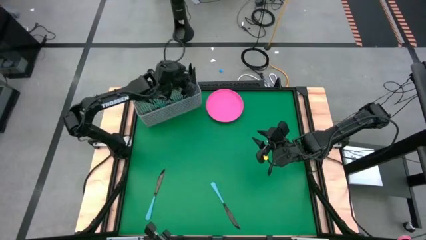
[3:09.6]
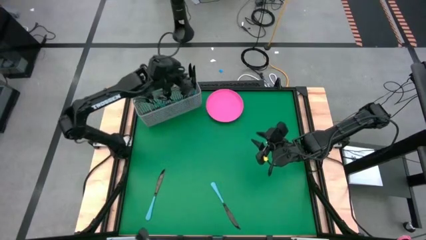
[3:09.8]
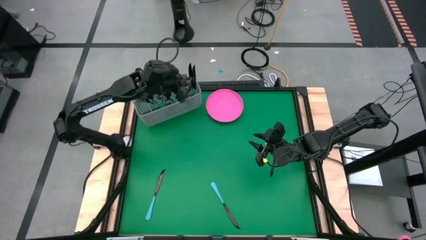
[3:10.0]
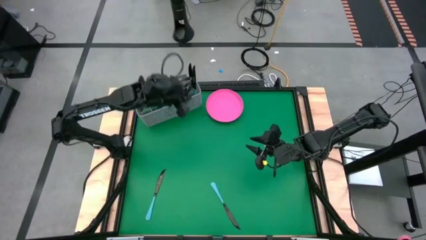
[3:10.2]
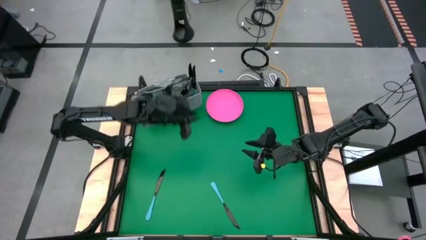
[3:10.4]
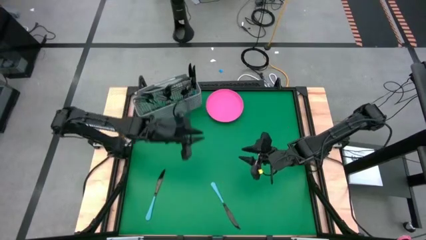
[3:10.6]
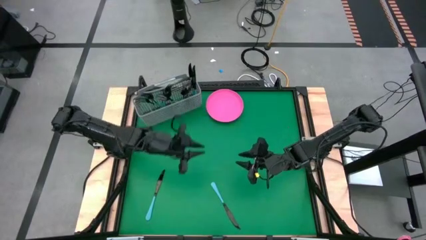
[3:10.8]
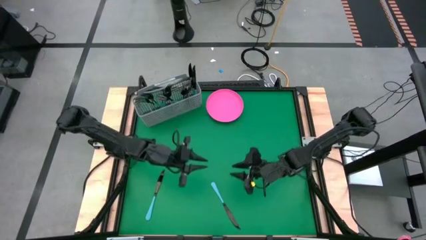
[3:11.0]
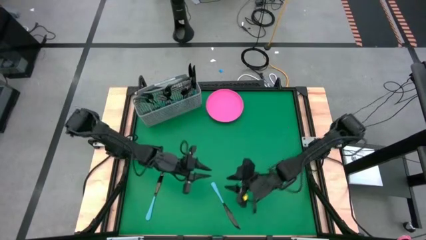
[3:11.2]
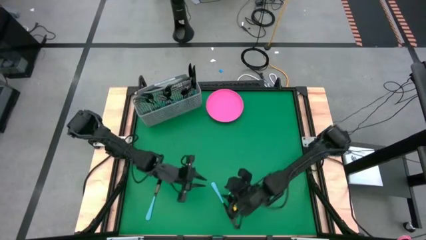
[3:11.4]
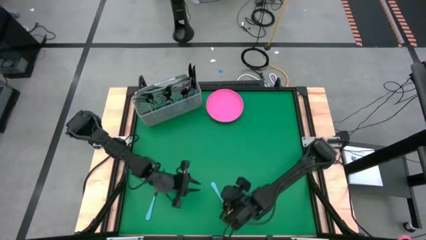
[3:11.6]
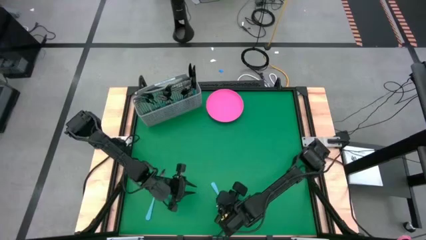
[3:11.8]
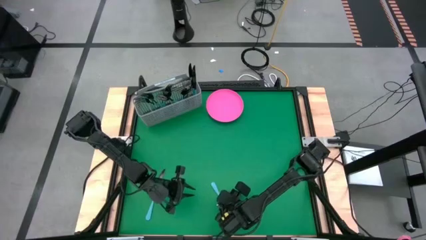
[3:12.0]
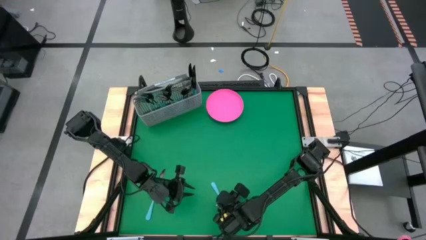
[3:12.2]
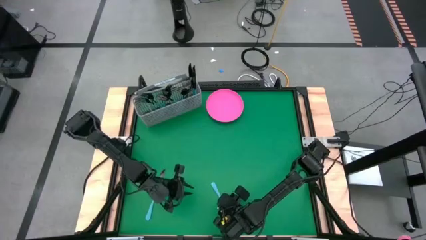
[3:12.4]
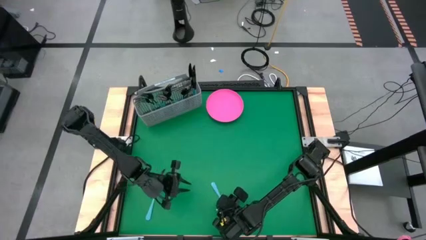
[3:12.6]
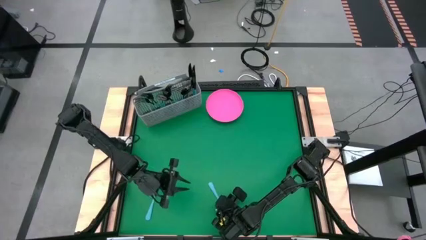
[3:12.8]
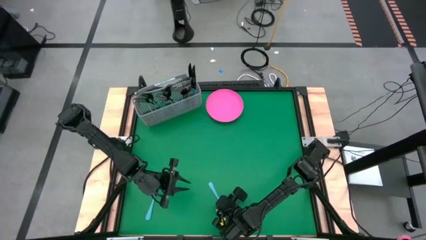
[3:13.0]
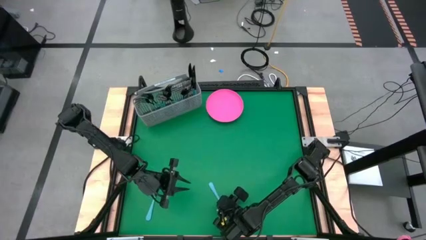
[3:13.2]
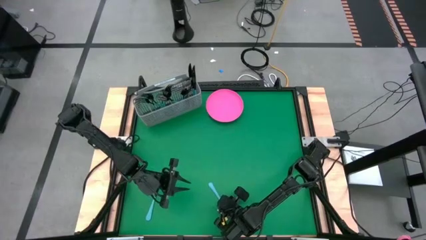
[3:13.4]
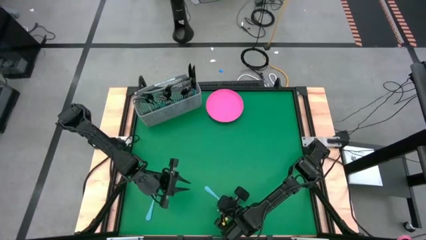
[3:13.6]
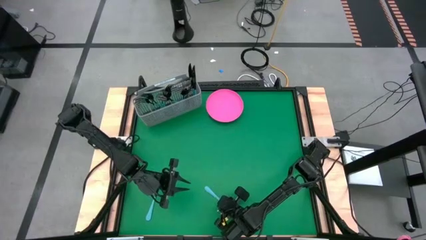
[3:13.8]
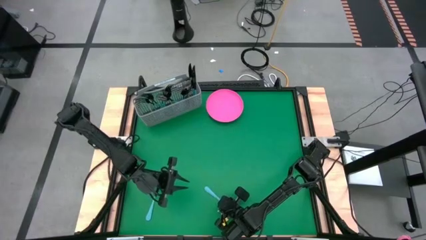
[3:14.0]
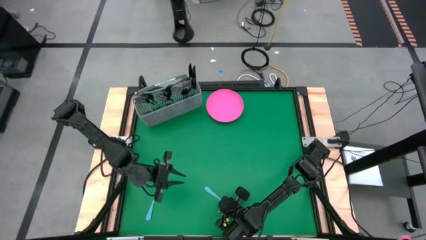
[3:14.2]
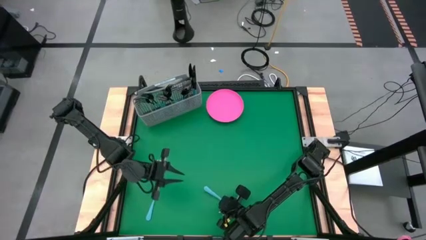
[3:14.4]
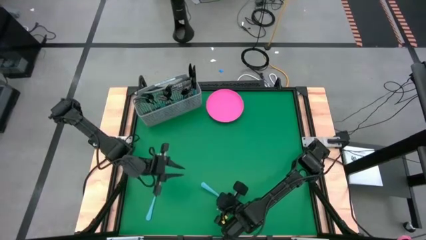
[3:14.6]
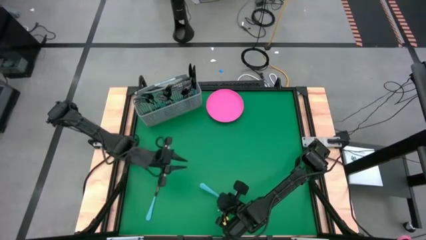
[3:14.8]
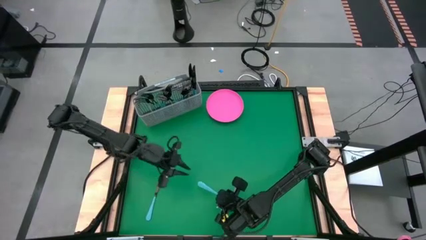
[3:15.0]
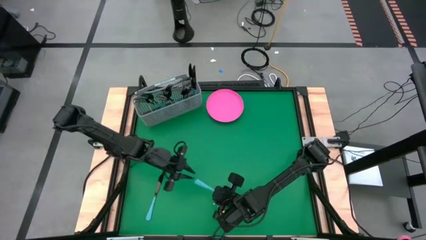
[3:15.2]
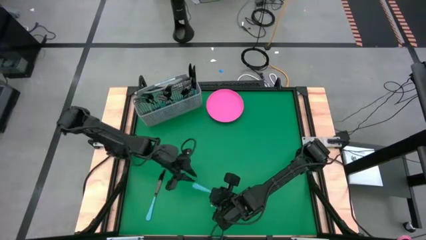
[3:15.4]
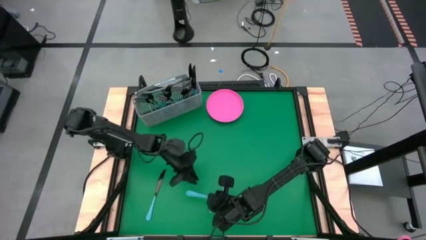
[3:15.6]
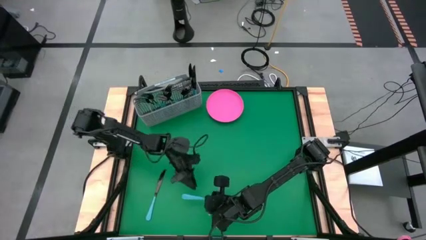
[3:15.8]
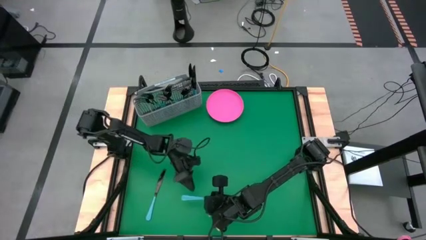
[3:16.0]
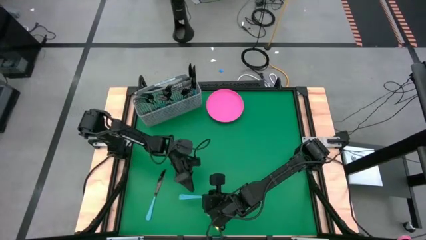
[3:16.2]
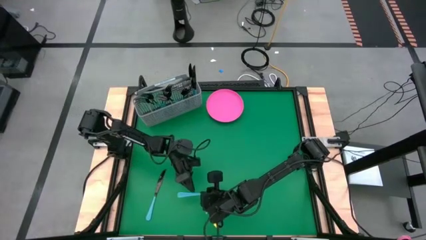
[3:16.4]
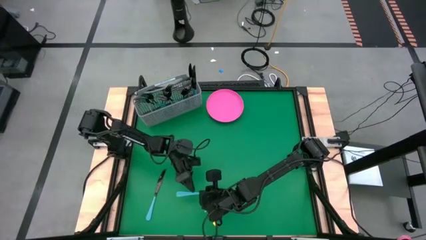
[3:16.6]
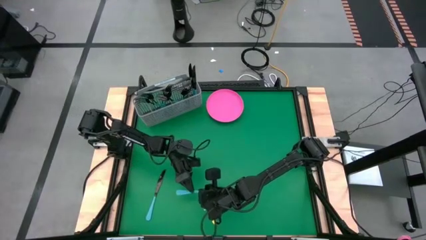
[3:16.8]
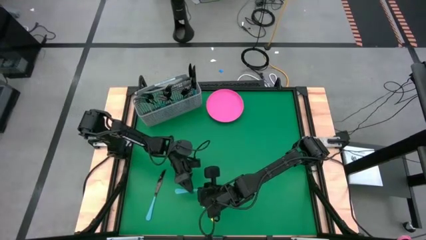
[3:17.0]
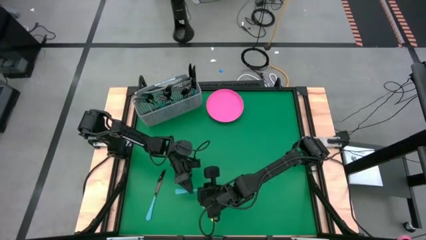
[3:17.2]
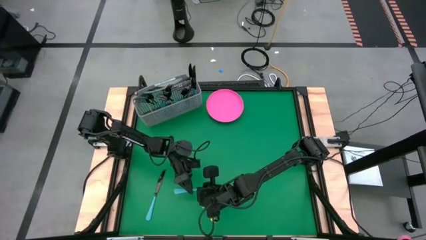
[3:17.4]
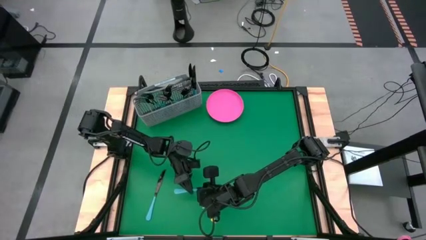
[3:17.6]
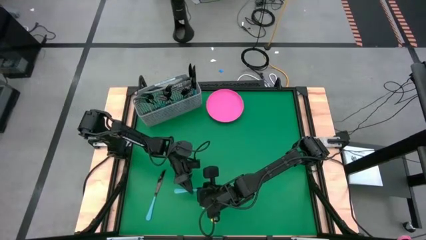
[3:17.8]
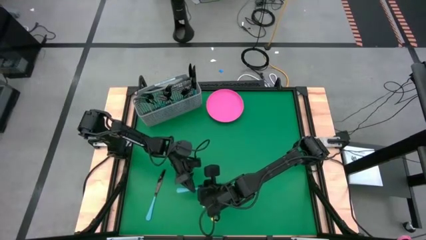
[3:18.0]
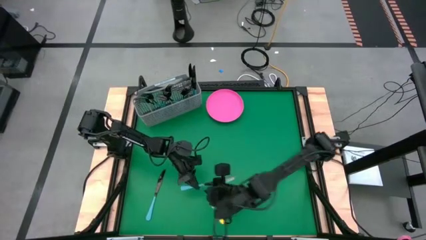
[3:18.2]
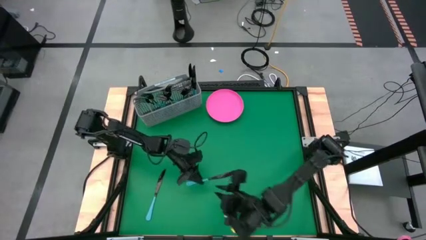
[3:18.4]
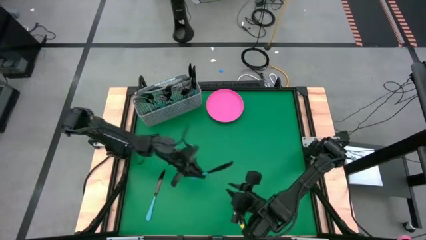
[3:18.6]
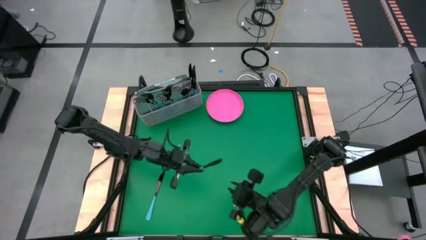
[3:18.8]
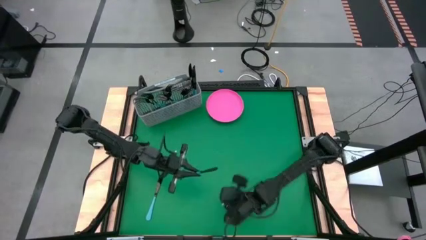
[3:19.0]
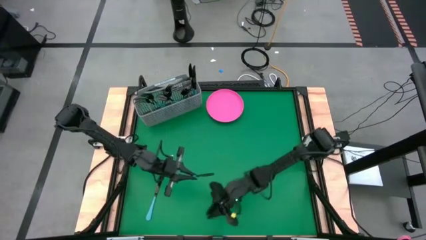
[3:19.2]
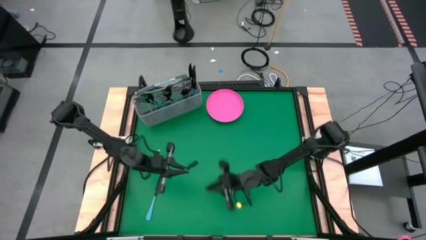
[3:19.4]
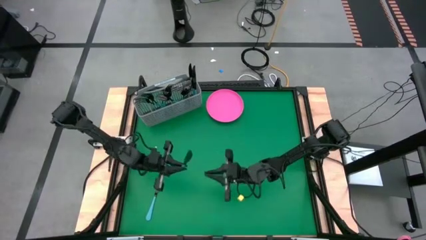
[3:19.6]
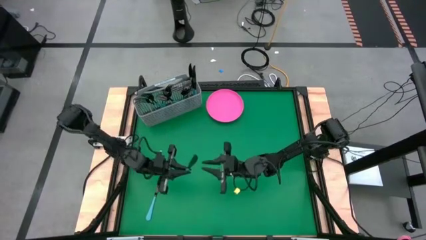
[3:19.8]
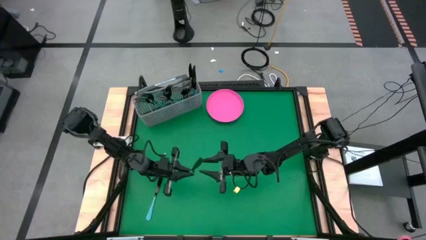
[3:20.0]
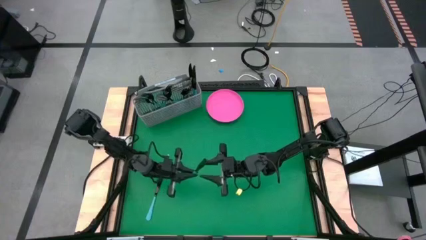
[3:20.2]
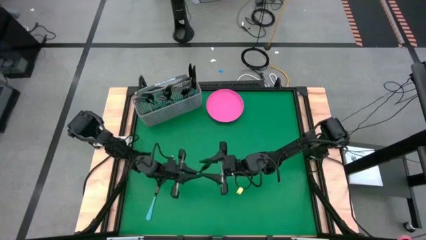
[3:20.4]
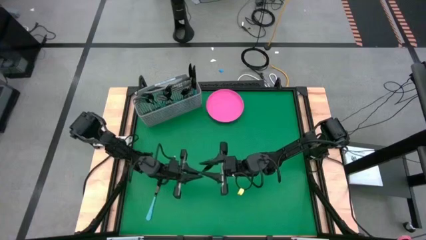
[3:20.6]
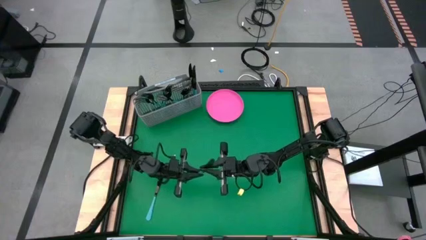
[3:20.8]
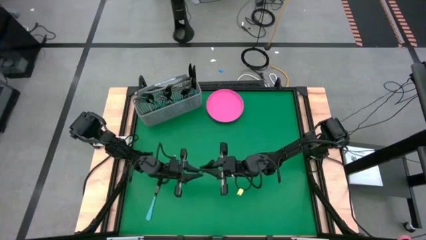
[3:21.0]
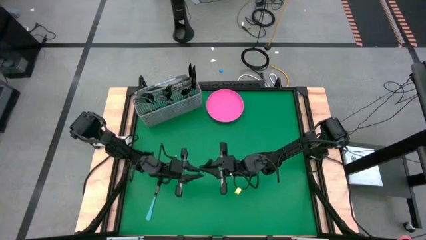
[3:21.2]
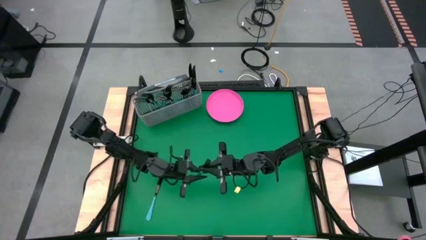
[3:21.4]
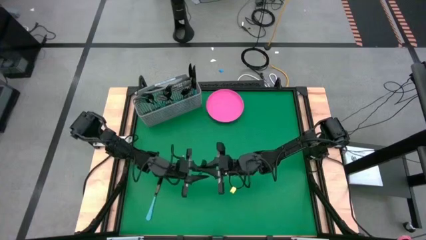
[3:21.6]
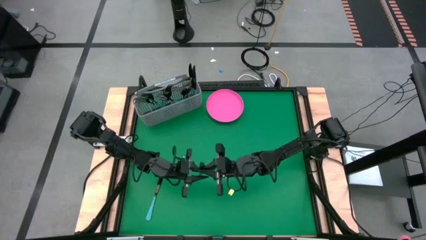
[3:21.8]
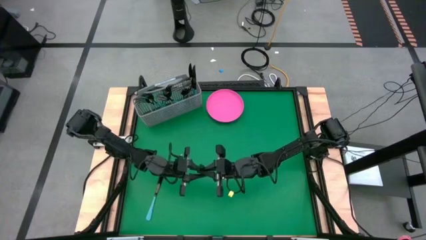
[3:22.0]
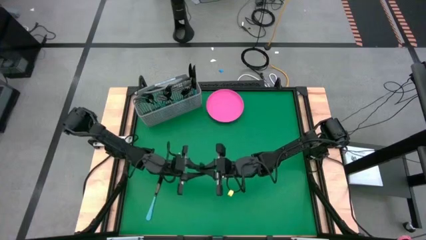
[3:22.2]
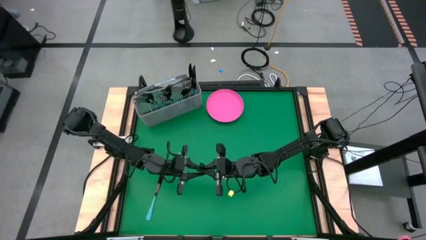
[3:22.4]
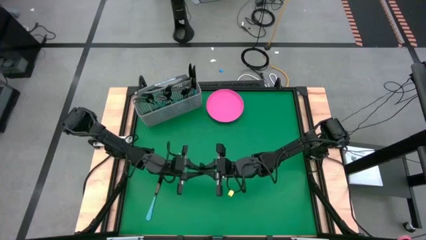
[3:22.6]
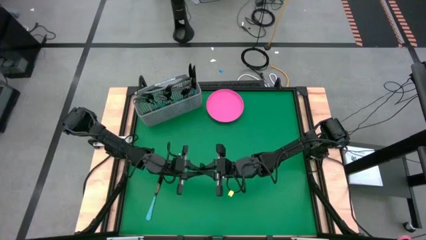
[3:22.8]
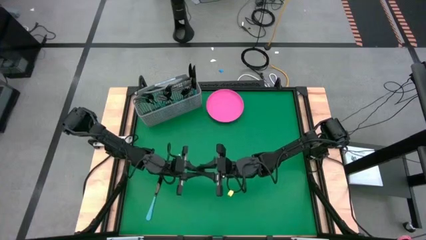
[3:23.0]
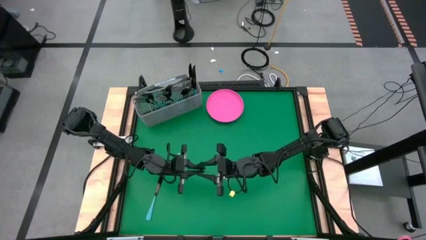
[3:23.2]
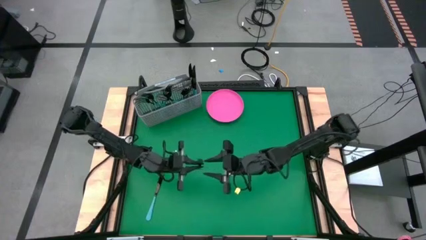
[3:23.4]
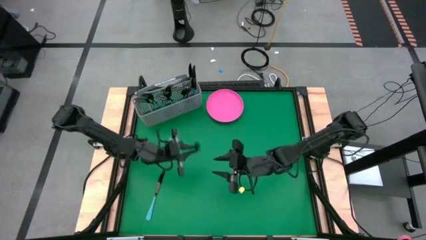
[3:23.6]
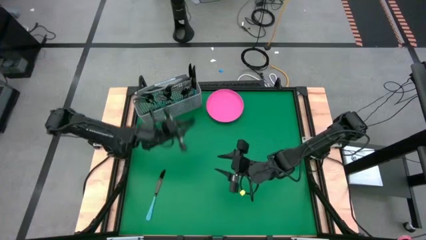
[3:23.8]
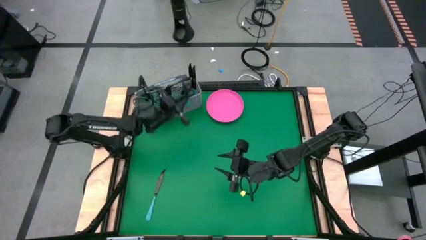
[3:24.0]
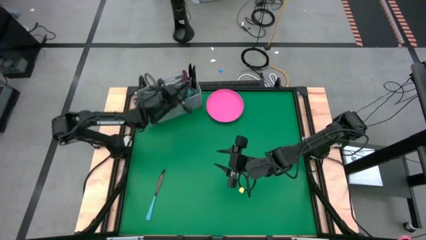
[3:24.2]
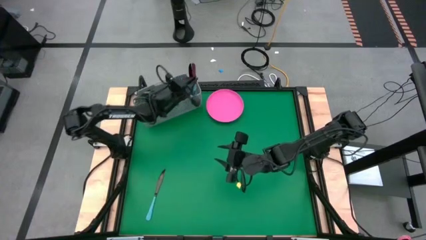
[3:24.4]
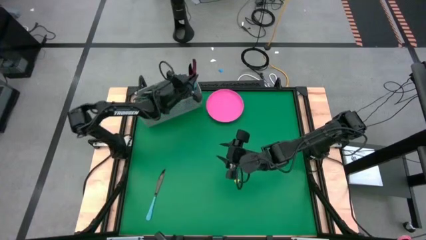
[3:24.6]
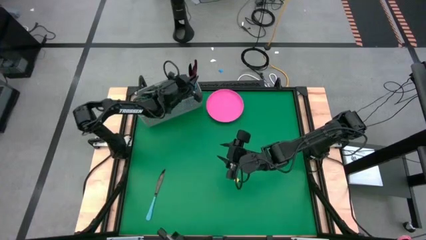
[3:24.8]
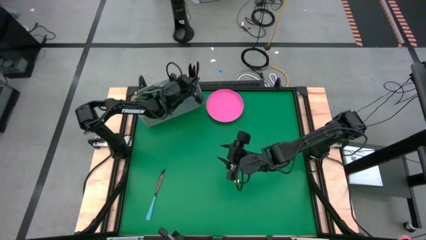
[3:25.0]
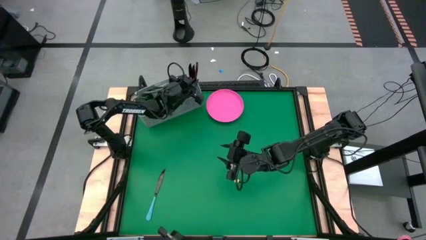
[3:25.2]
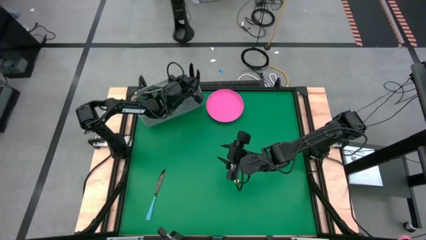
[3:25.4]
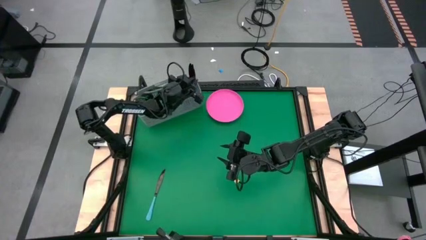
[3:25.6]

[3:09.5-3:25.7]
Task: Sort silverware
Put the blue knife into the gray silverware holder
